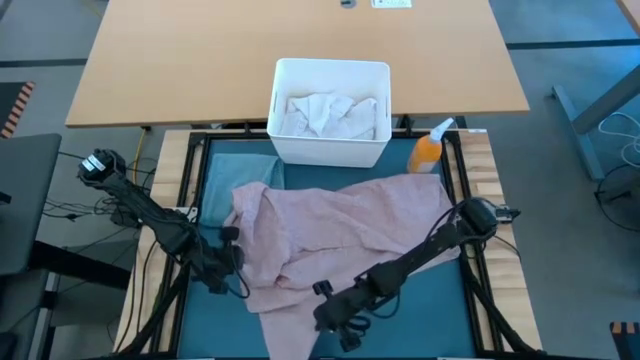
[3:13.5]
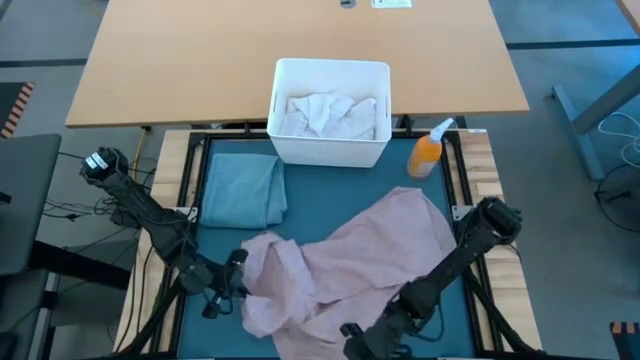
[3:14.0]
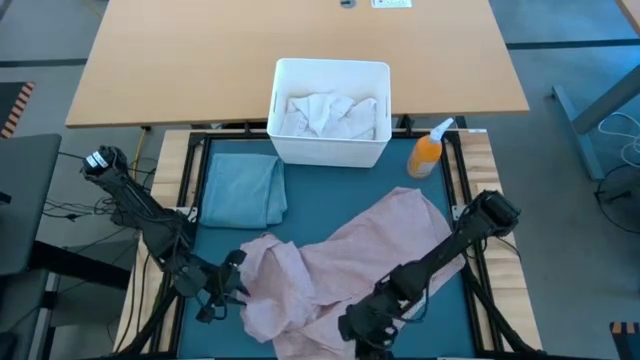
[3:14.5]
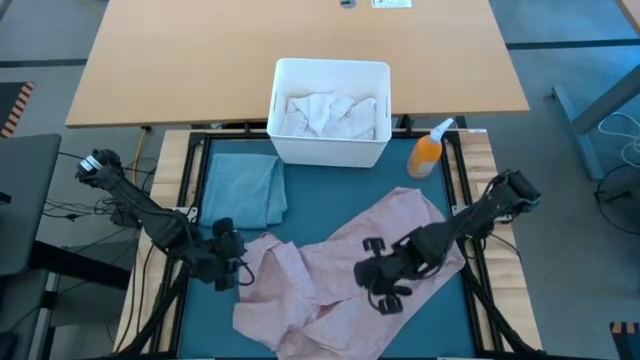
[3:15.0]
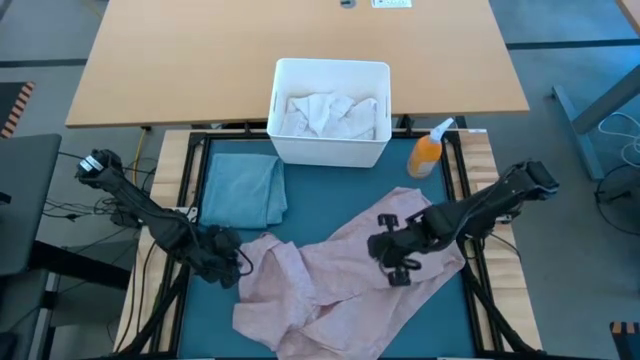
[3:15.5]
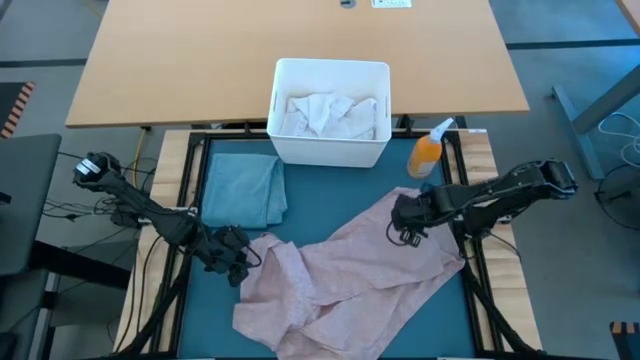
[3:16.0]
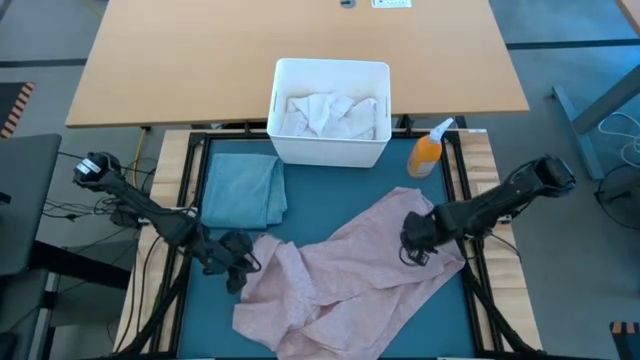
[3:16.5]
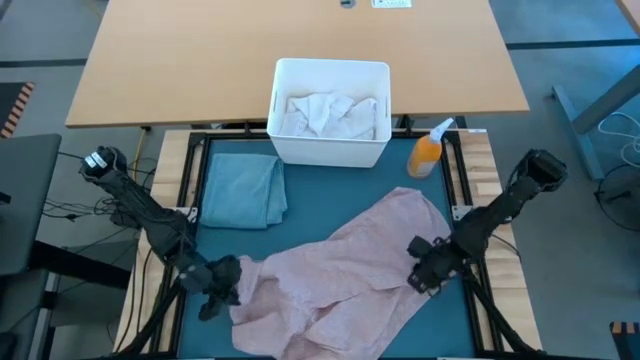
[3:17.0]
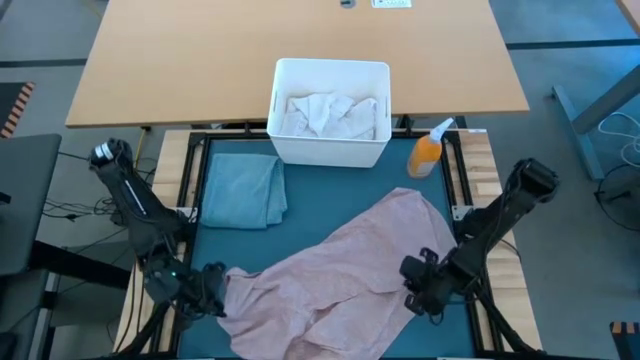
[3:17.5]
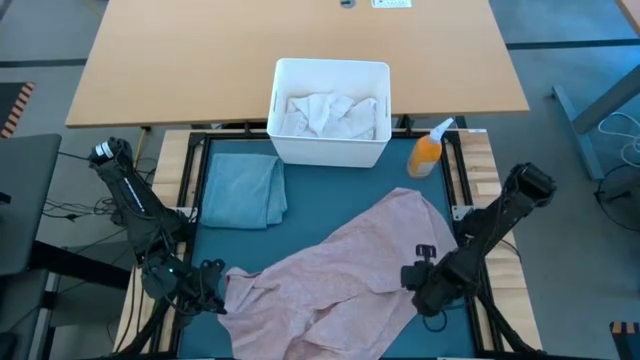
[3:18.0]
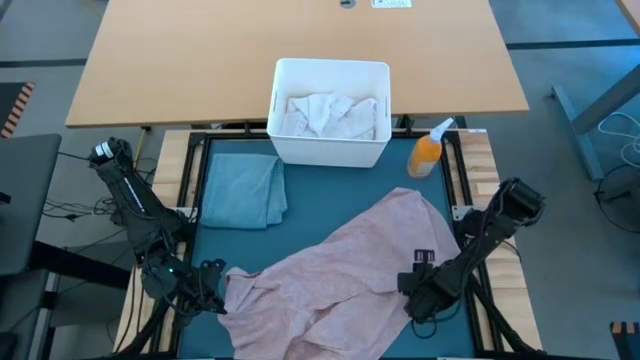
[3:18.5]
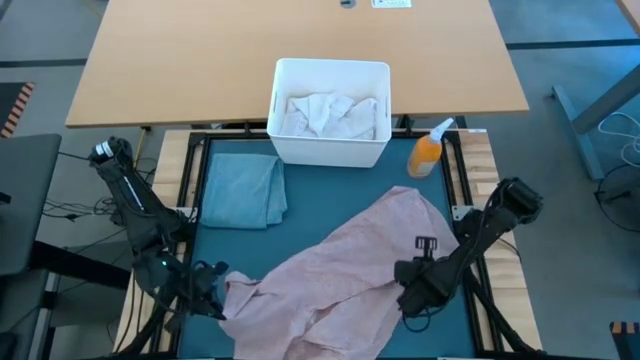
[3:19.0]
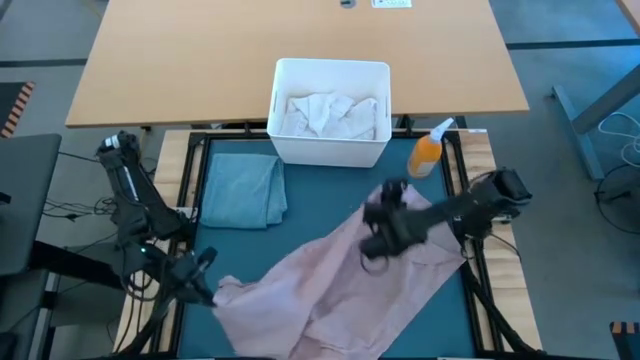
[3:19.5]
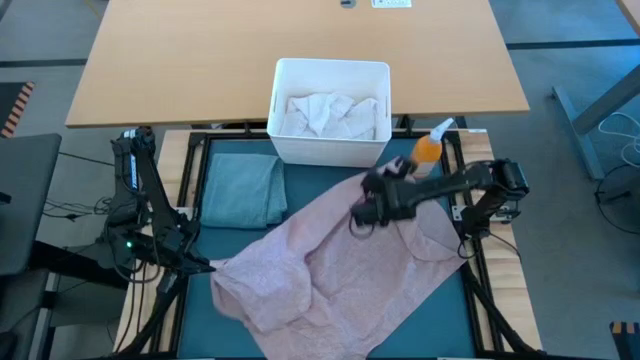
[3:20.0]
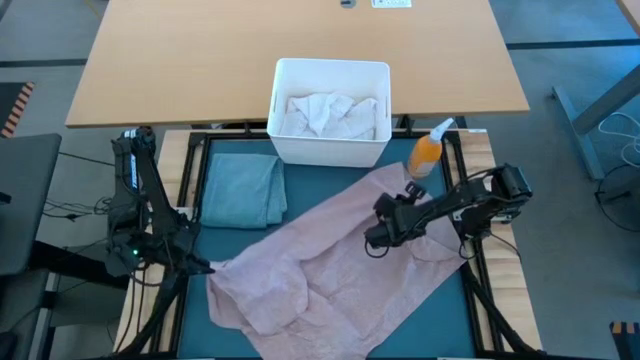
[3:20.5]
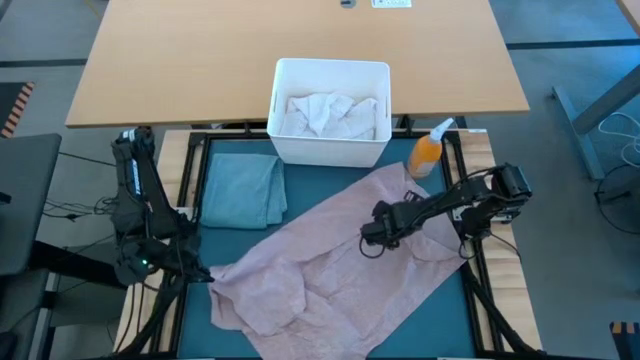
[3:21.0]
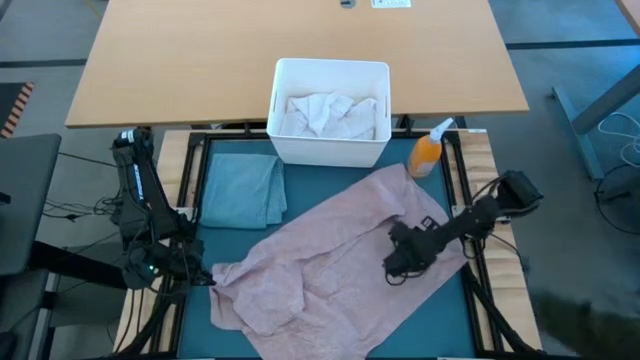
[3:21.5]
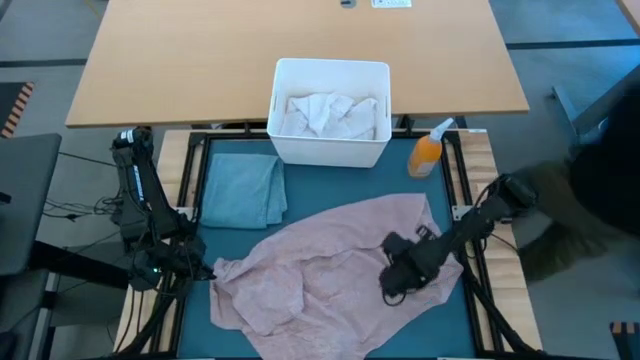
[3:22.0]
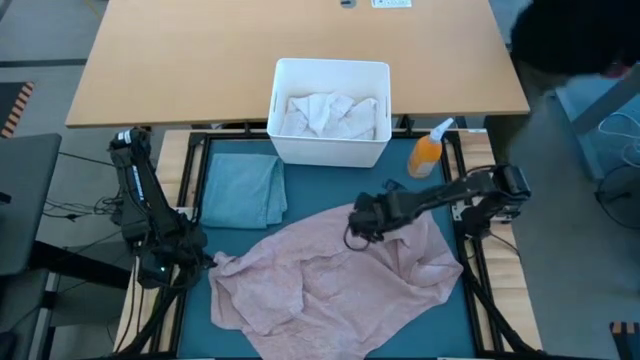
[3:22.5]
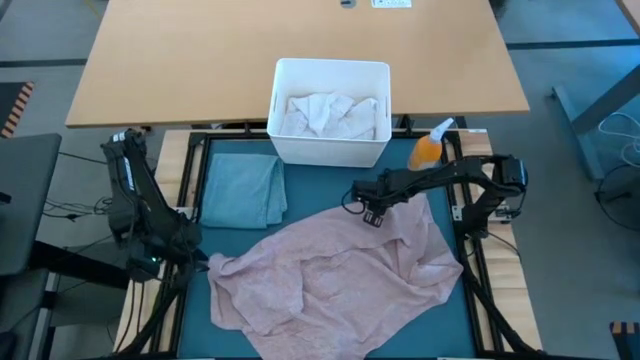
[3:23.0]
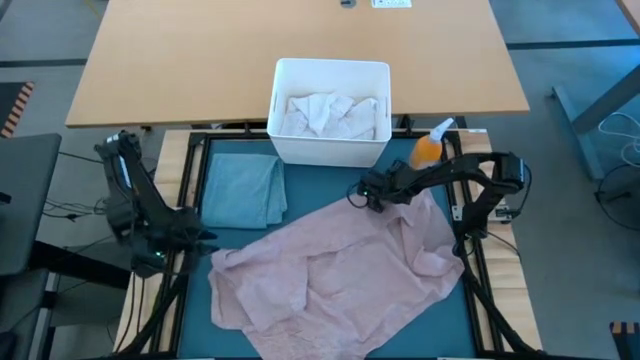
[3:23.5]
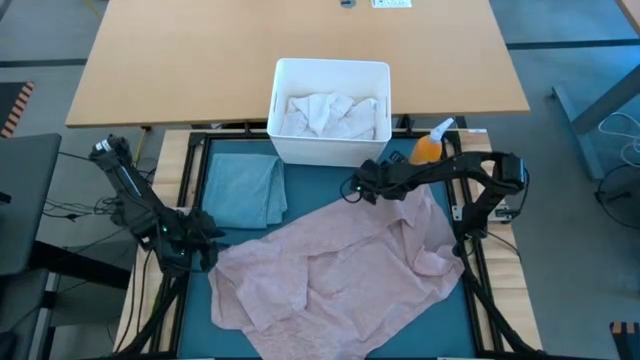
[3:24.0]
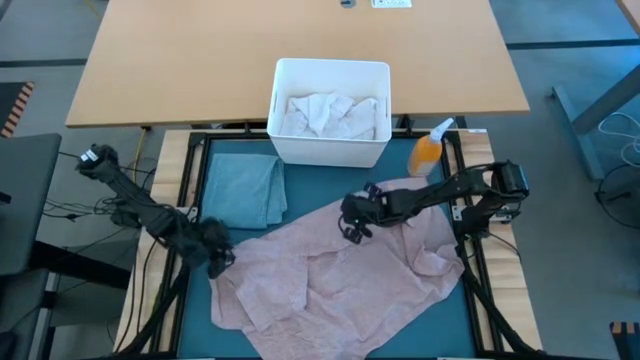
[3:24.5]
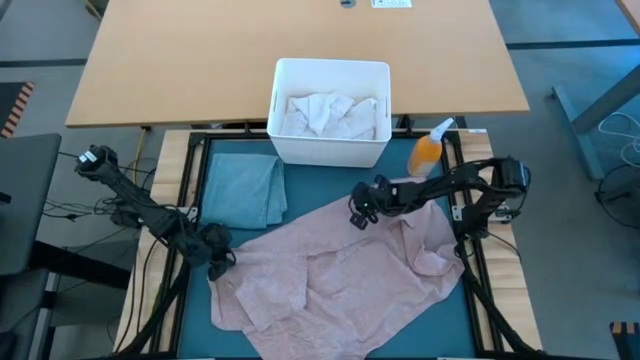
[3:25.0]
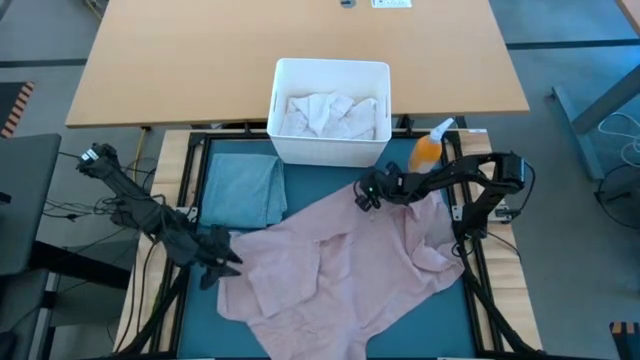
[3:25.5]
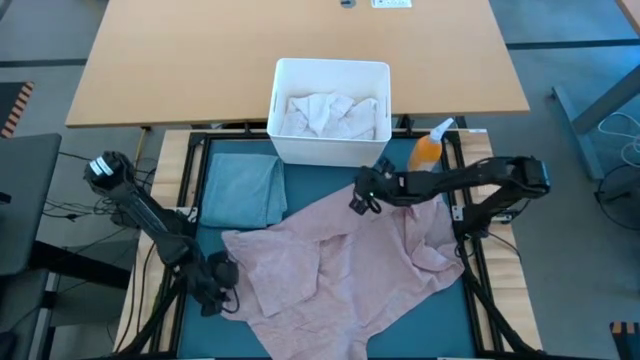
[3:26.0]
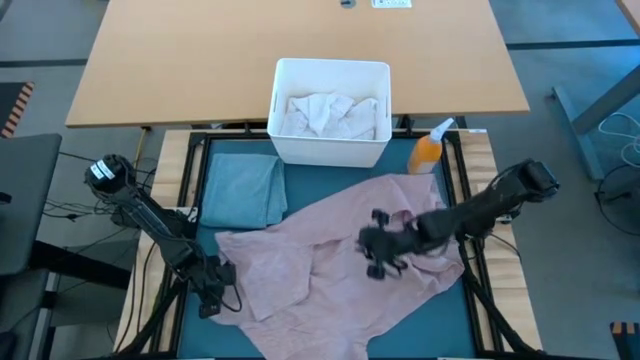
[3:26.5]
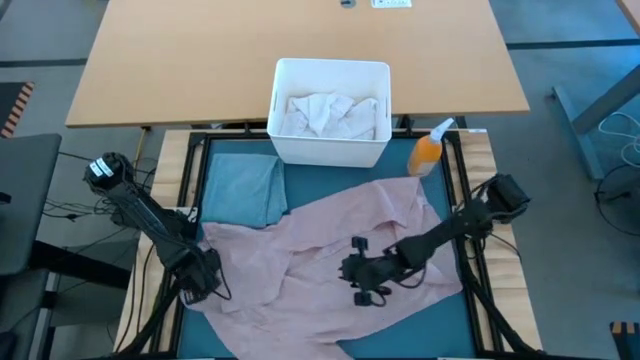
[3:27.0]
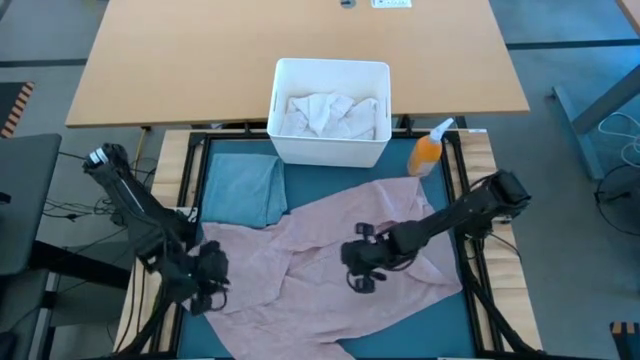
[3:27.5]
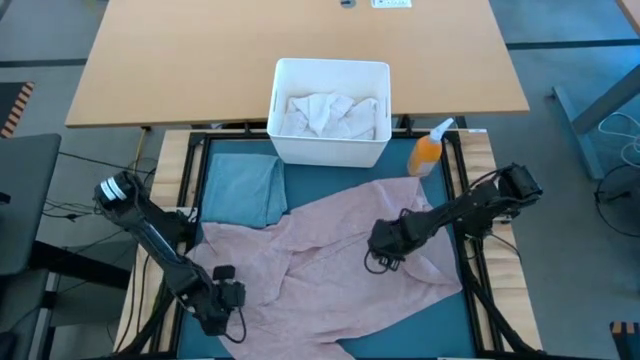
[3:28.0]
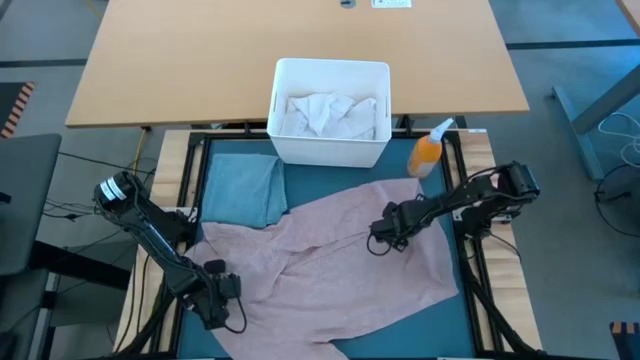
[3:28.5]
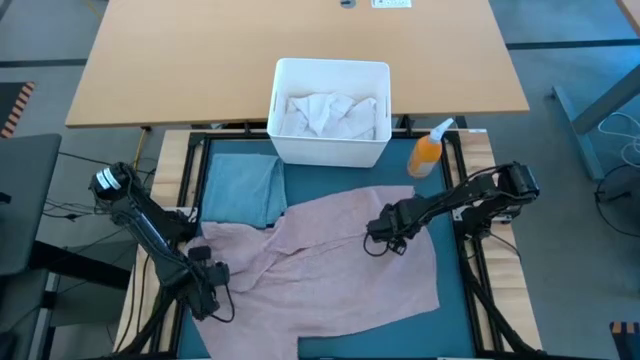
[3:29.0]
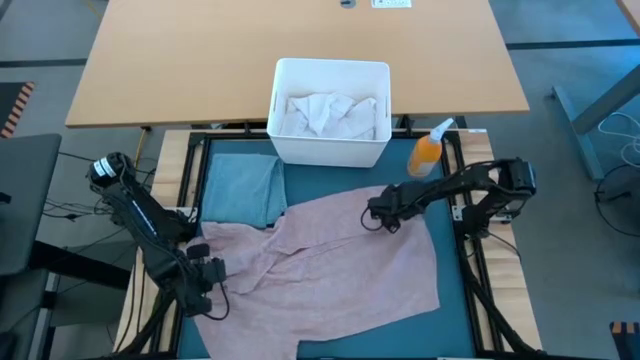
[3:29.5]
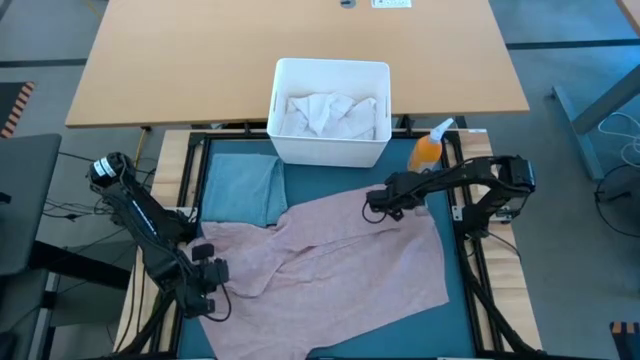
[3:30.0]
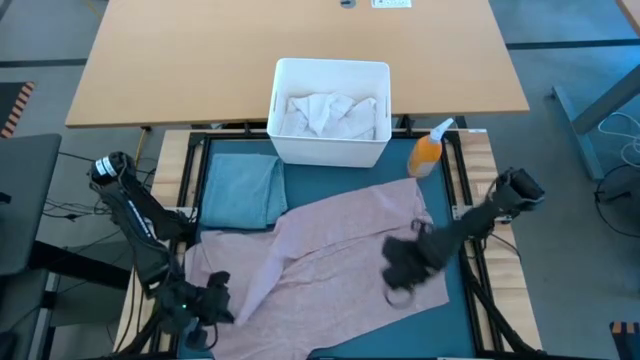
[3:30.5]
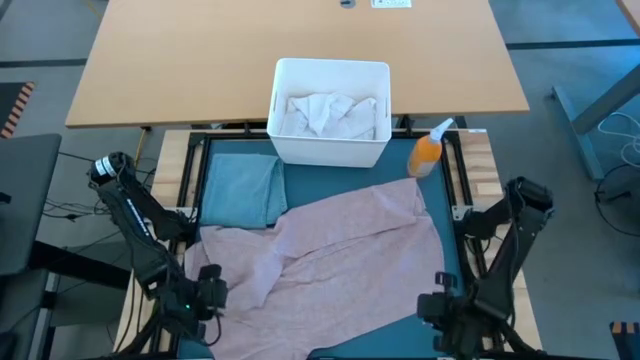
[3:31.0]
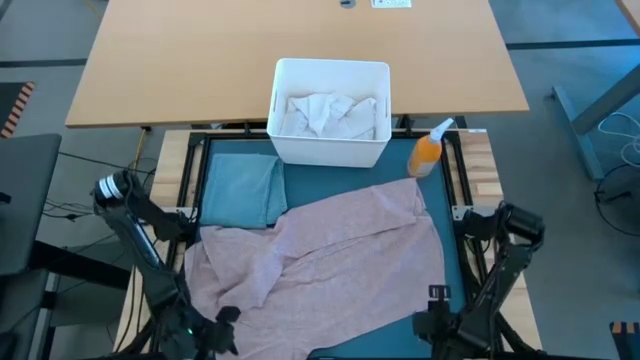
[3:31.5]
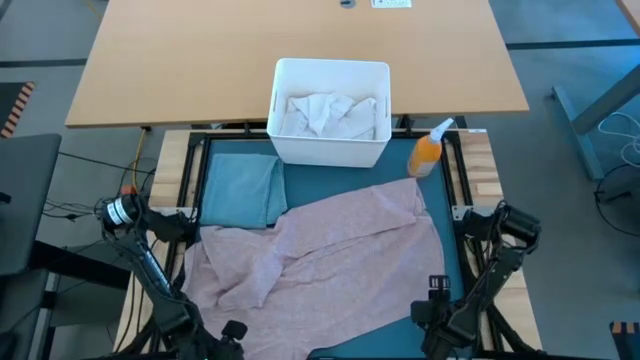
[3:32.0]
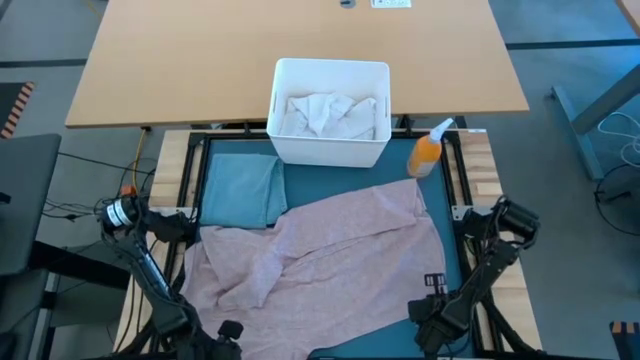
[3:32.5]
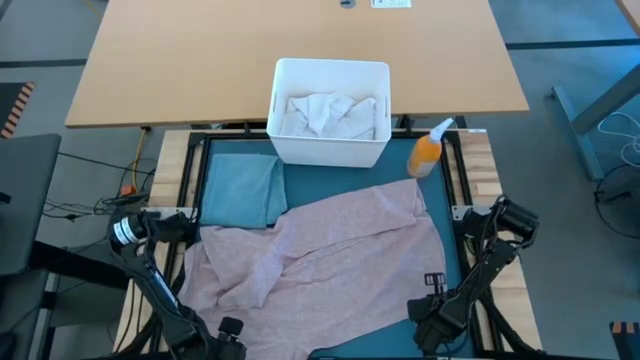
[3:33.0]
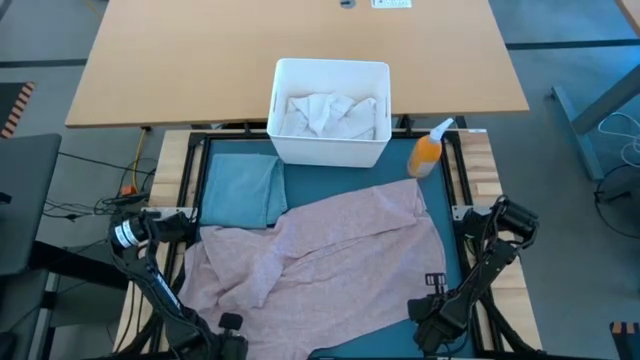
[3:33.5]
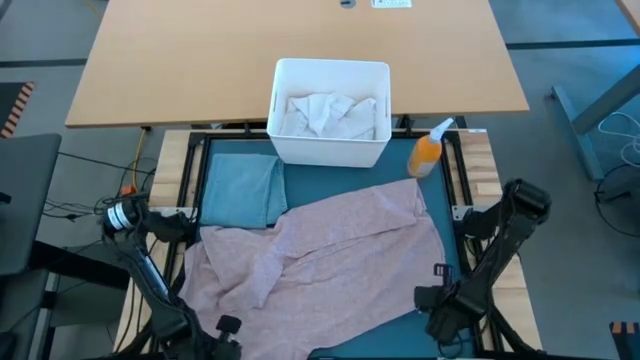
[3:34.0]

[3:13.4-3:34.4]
Task: Fold Laundry from Bin
Fold the pink shirt
